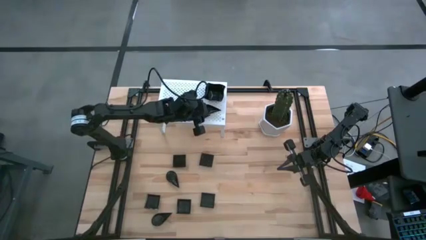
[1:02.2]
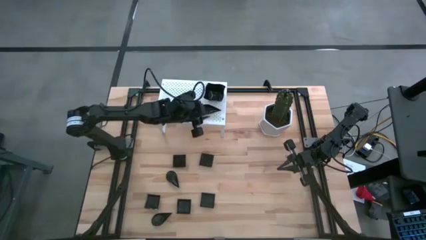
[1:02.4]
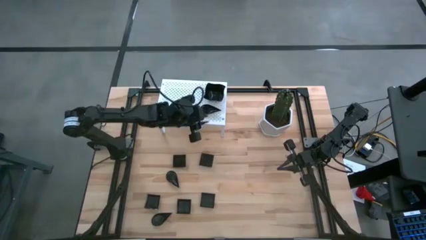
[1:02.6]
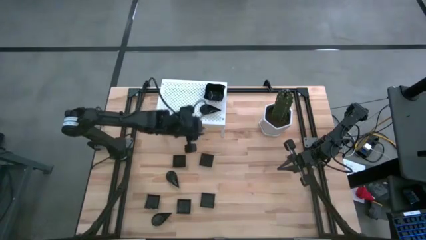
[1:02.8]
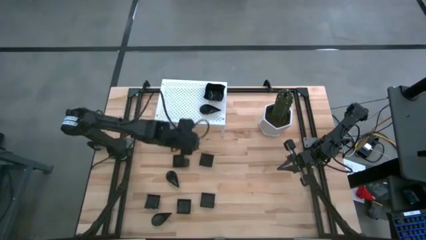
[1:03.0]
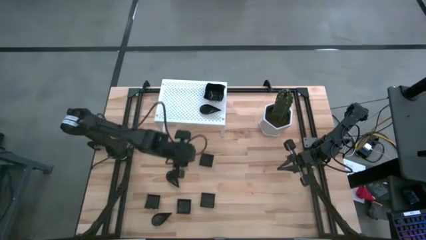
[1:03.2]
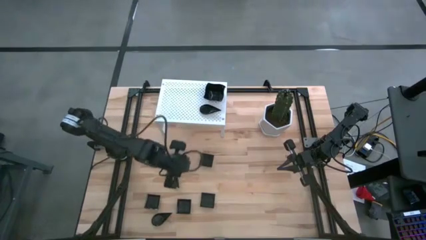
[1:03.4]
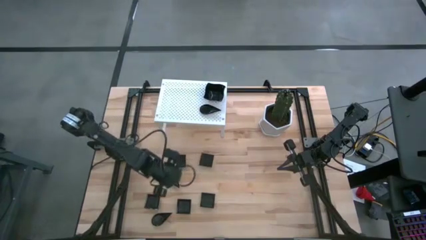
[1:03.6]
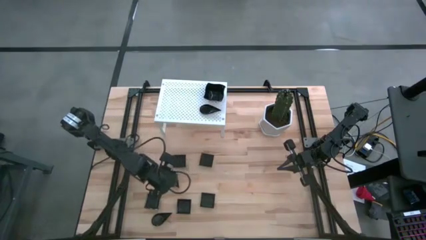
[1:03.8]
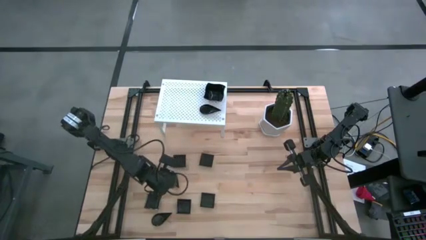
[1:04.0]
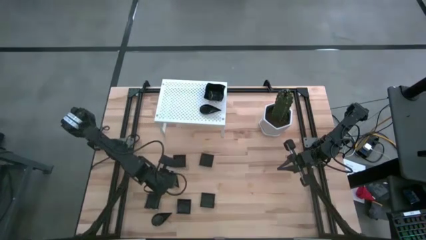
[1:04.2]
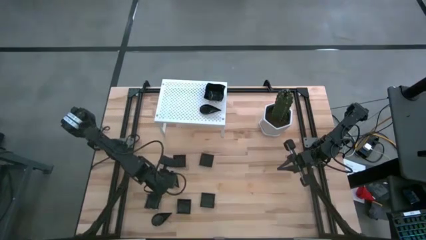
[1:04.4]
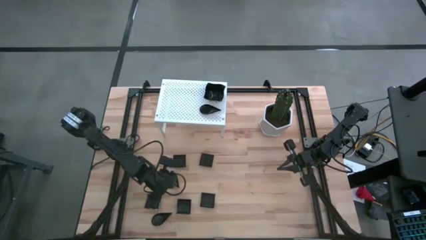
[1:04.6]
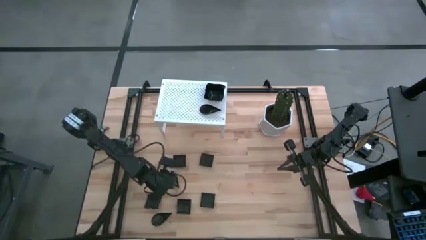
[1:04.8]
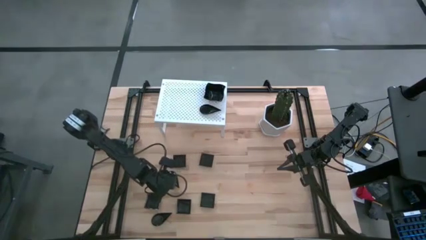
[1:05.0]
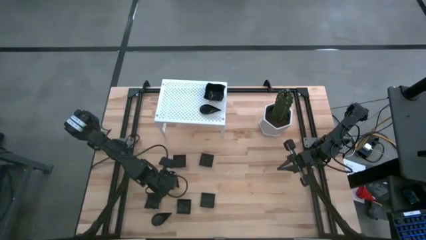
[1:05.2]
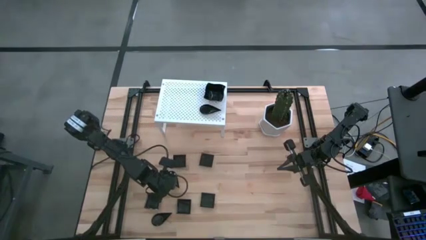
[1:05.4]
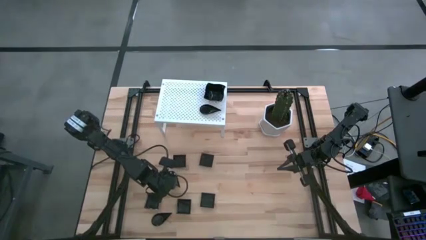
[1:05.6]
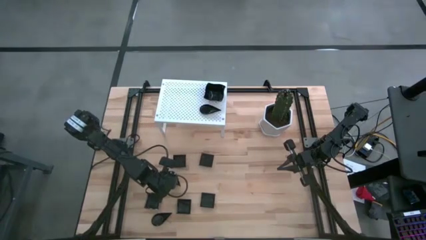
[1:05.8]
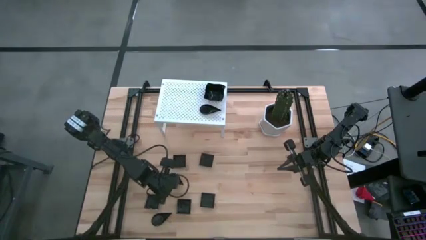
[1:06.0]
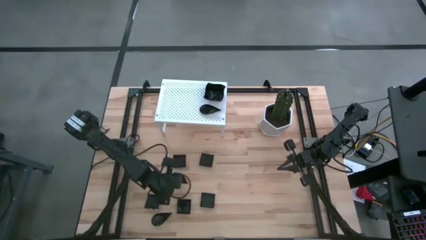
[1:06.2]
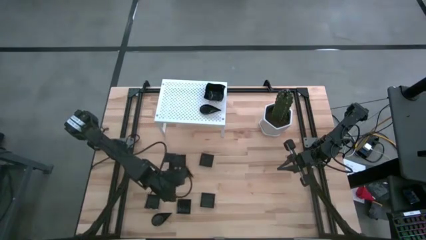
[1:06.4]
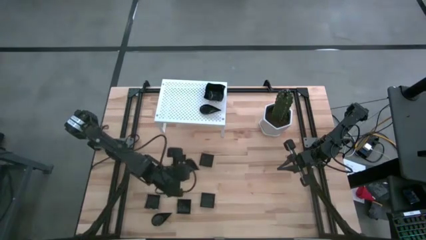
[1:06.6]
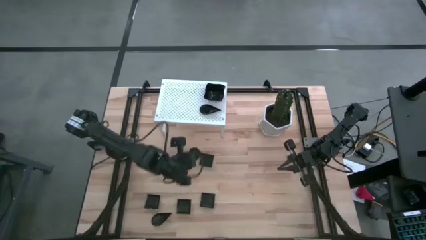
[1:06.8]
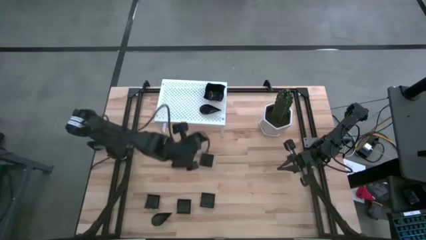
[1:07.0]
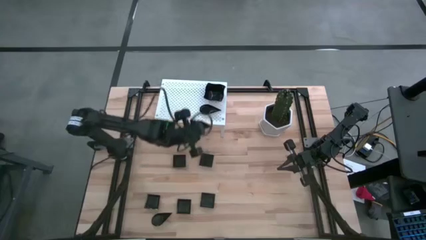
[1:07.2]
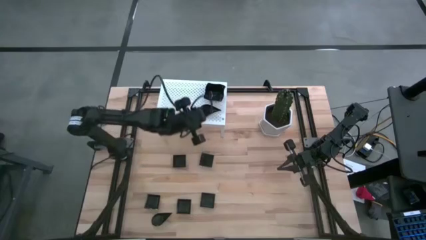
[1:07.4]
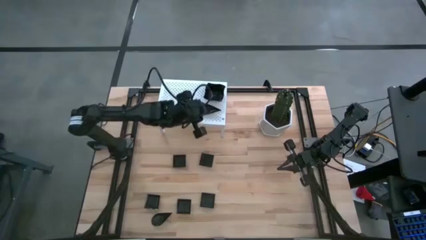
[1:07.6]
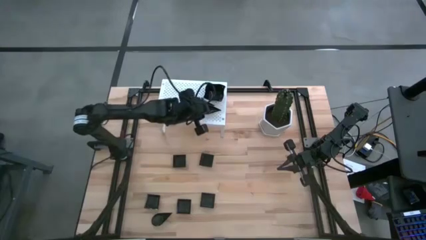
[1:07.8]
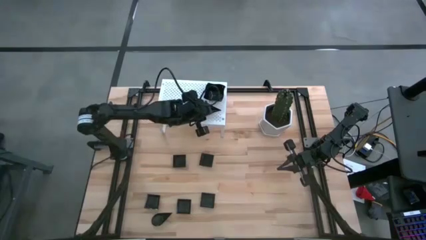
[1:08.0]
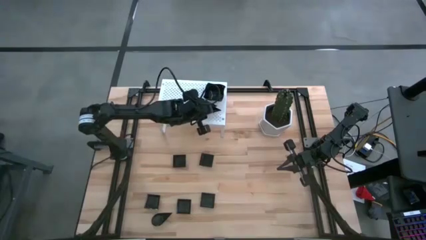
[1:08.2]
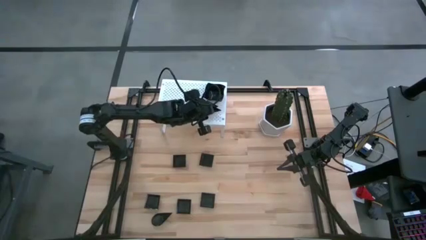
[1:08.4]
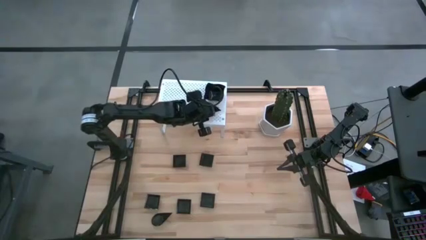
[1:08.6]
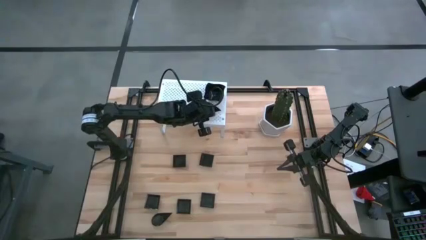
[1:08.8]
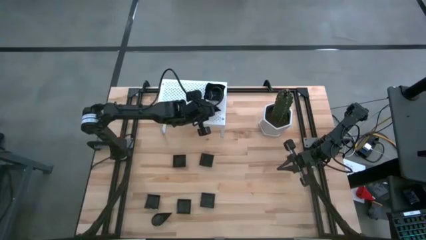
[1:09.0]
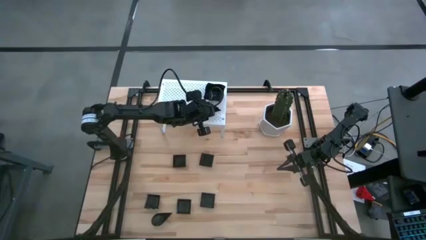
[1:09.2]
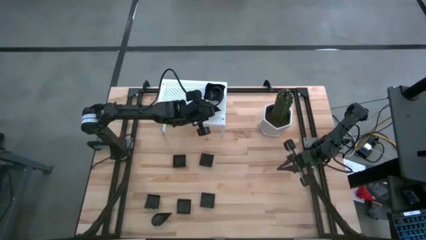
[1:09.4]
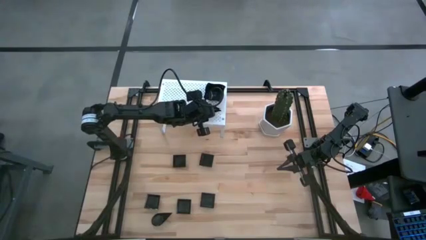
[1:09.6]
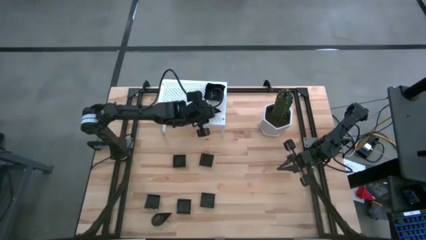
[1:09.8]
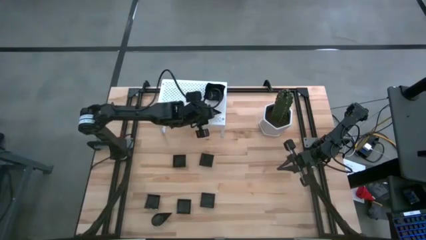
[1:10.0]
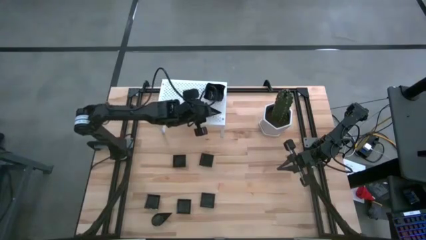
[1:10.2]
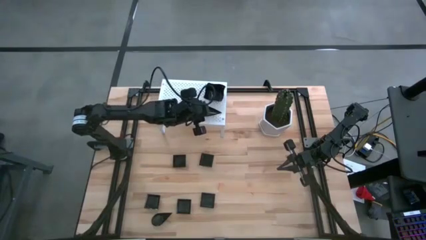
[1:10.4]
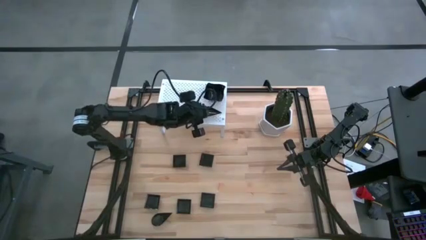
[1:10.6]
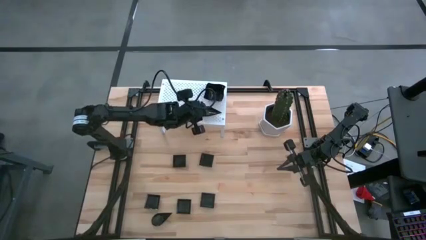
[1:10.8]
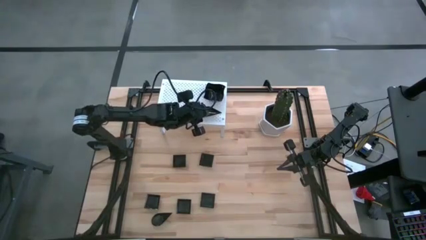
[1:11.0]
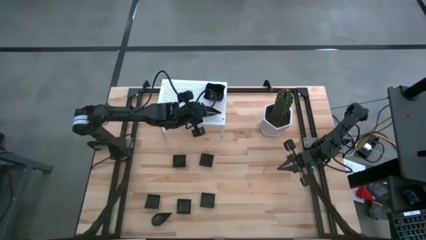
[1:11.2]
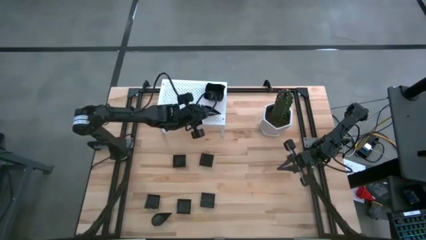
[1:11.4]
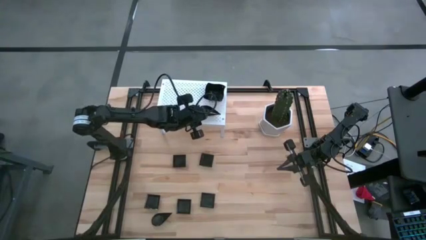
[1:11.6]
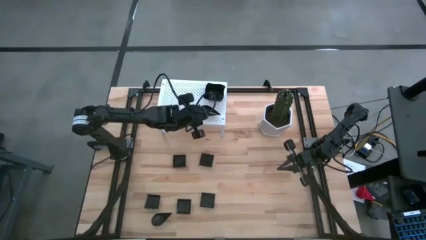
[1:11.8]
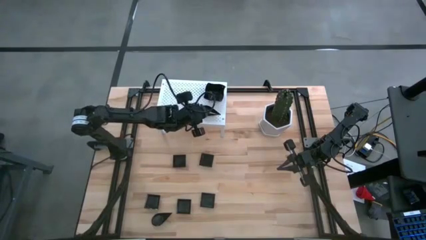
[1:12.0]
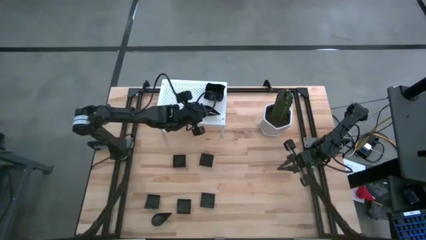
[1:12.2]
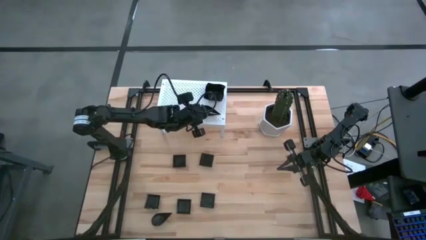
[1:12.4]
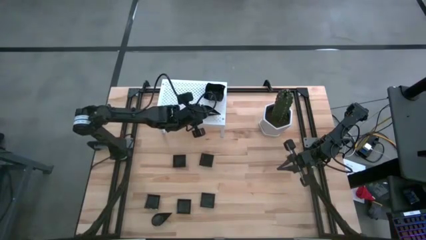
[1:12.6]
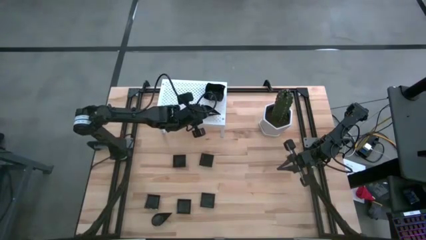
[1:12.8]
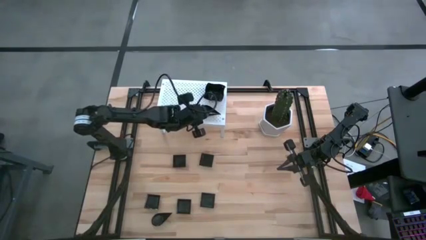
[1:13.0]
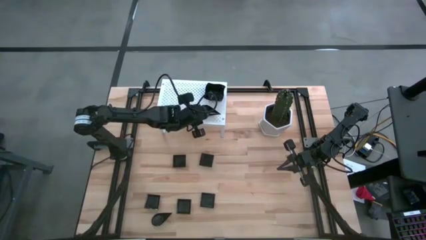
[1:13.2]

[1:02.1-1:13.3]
Task: Pick & Place Mini shaped plates
Stack the drop-shaped plate on top of the other drop-shaped plates on the shelf

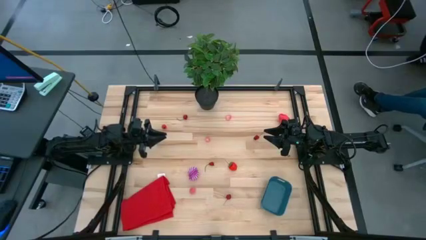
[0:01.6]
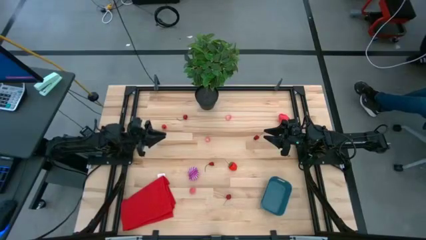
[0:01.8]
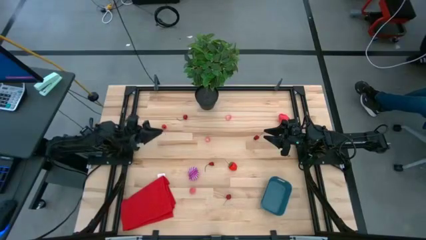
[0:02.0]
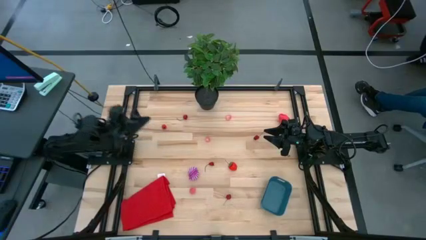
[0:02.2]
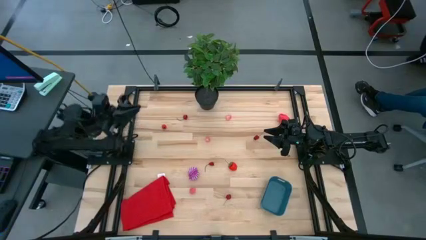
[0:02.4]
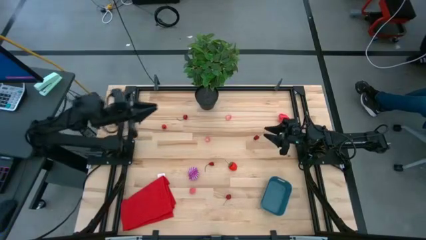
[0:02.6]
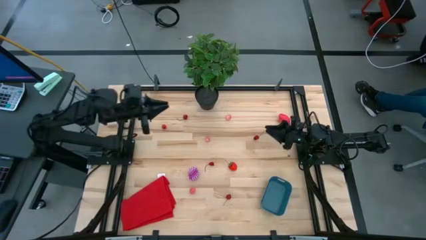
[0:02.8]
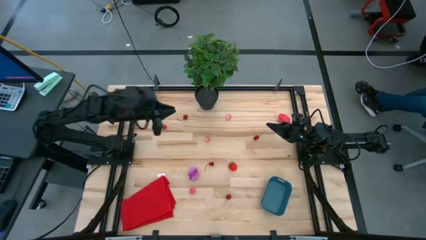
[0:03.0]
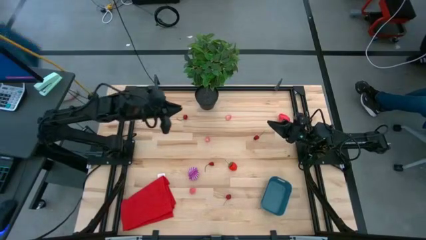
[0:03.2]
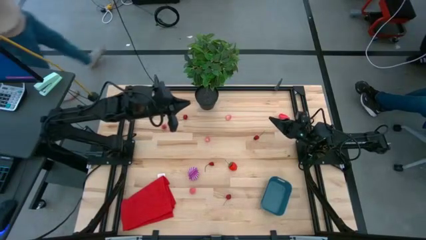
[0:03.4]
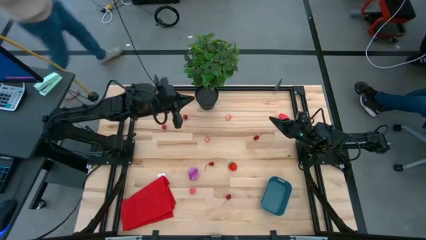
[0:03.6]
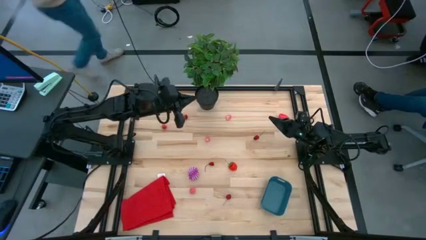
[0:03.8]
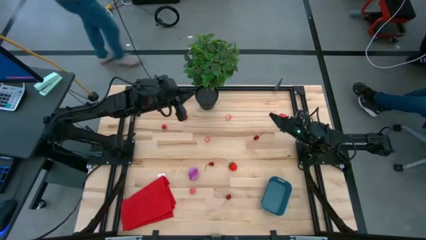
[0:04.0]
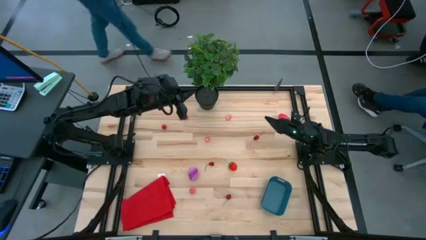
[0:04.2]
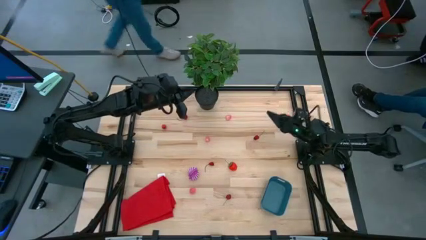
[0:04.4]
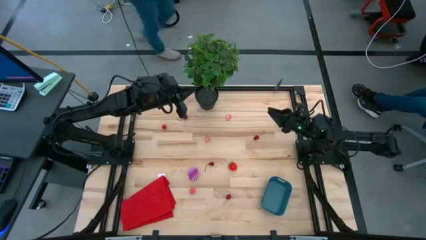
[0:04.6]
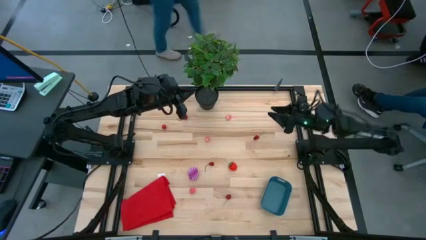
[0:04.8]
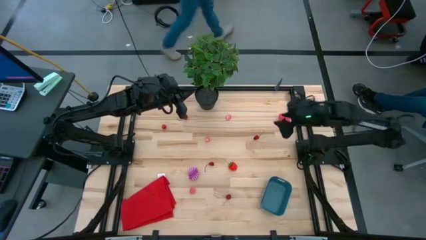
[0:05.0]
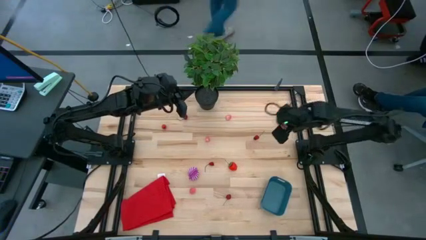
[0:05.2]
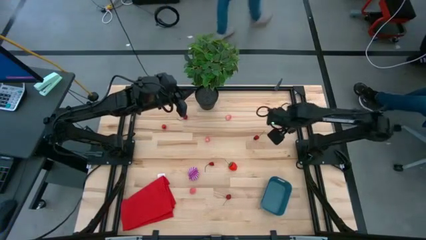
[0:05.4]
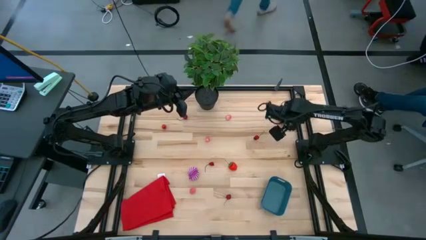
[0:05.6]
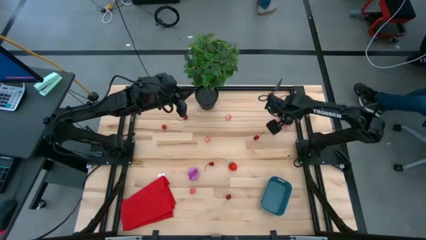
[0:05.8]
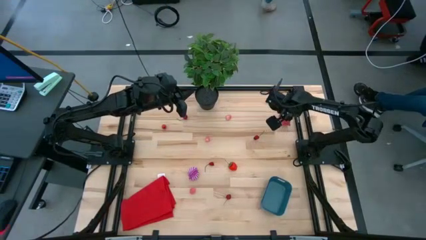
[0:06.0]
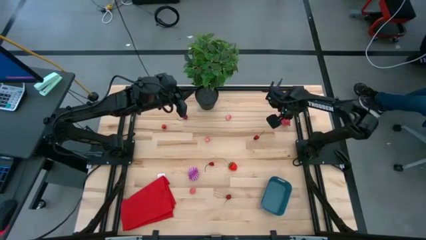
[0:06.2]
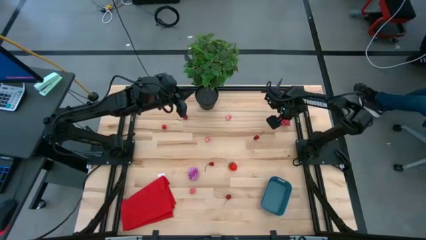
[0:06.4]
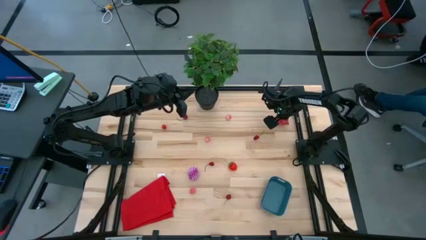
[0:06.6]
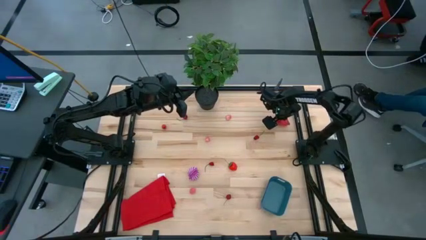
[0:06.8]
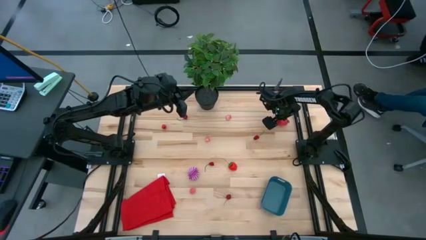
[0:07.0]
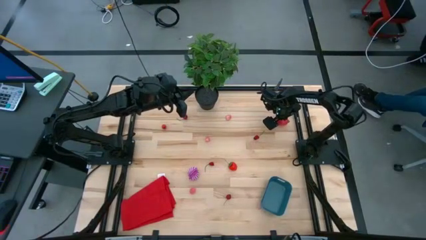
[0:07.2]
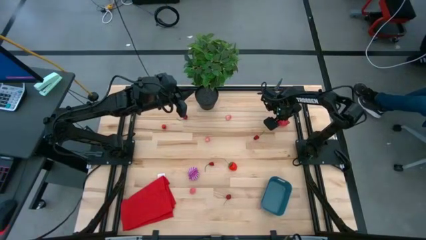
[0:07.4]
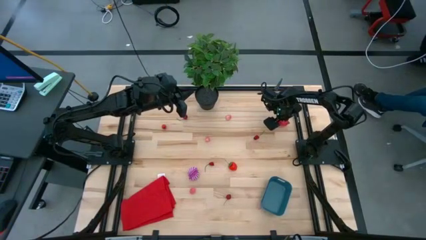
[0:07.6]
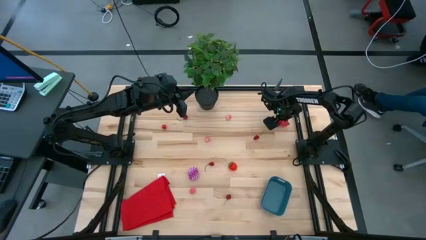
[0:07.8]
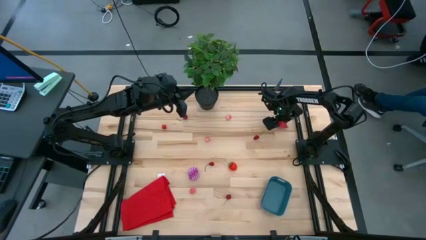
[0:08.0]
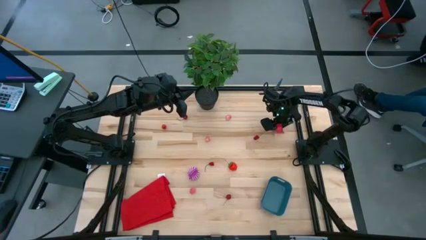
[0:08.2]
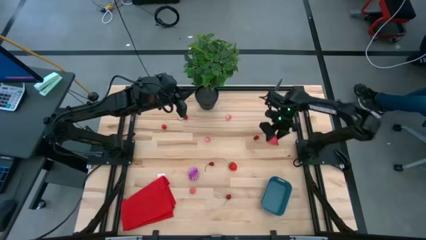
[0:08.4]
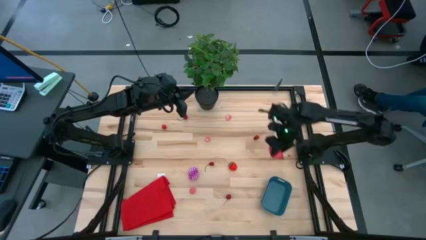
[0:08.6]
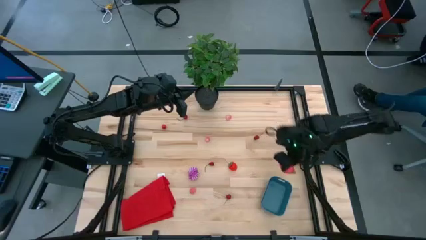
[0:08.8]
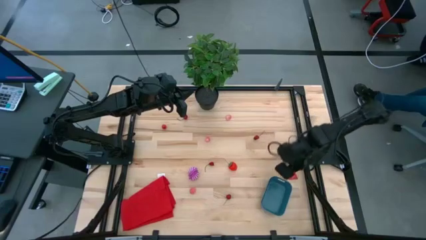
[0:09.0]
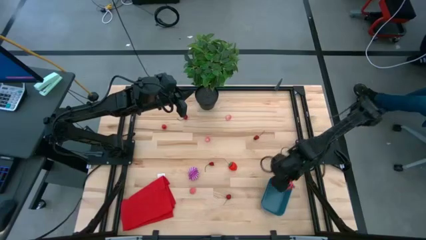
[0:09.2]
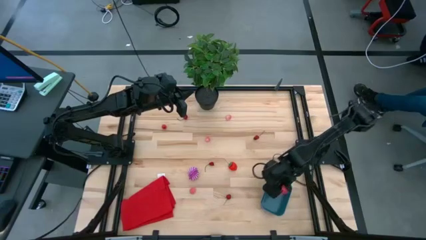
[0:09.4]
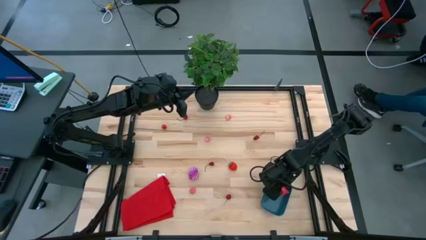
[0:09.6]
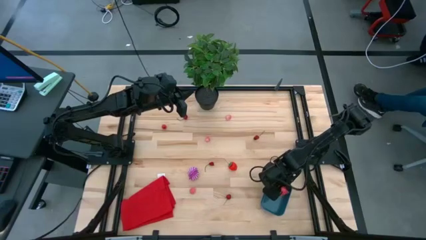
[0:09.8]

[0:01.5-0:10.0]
Task: Pick and placing Produce into tupperware
Put the dragon fruit into the bin
